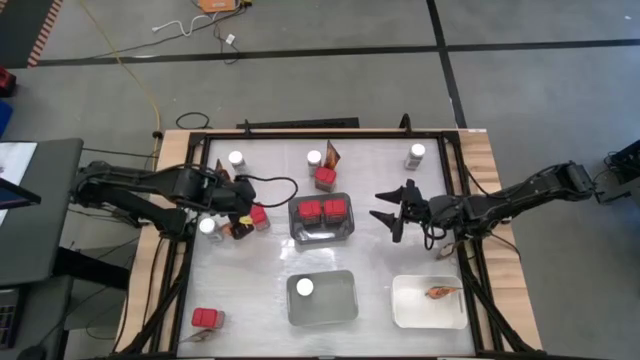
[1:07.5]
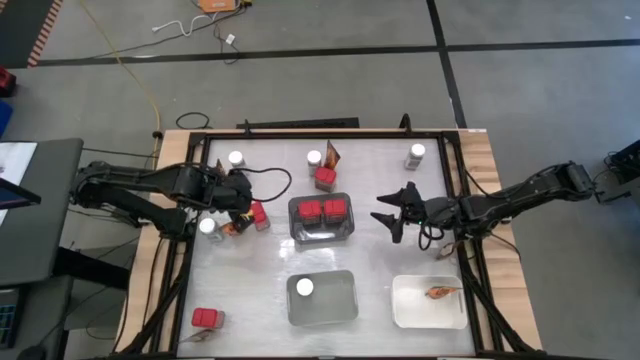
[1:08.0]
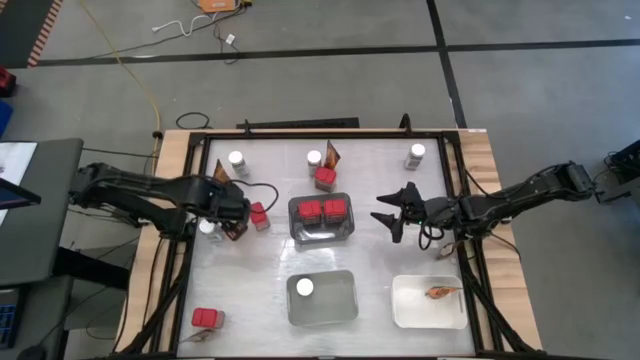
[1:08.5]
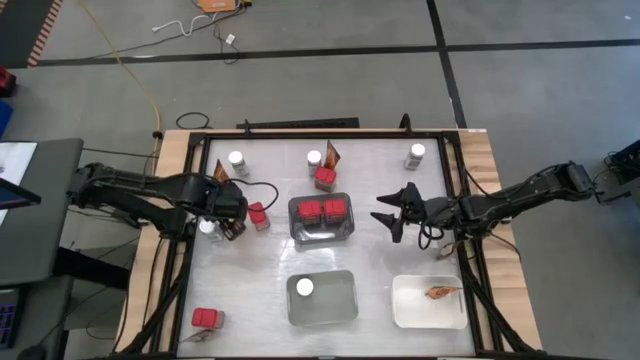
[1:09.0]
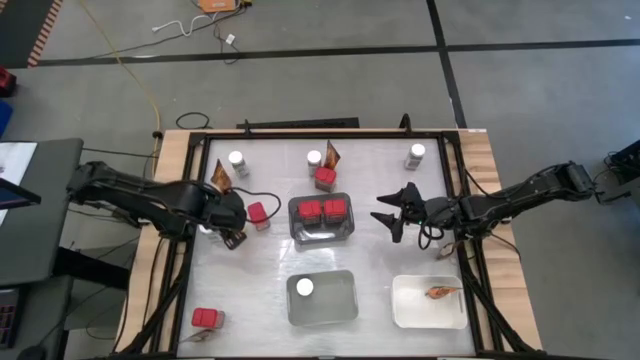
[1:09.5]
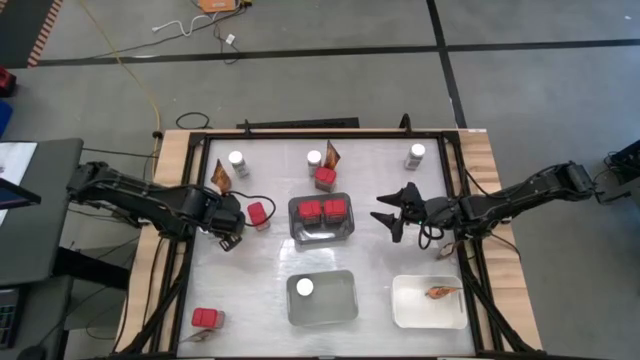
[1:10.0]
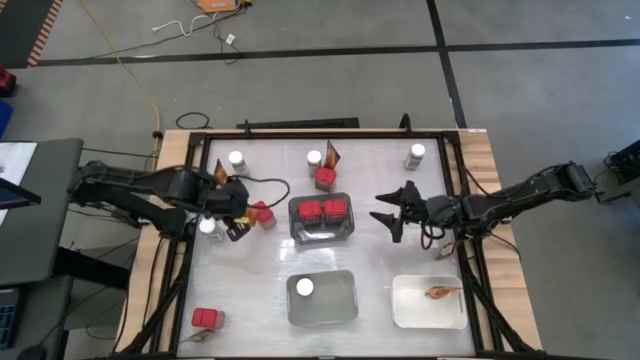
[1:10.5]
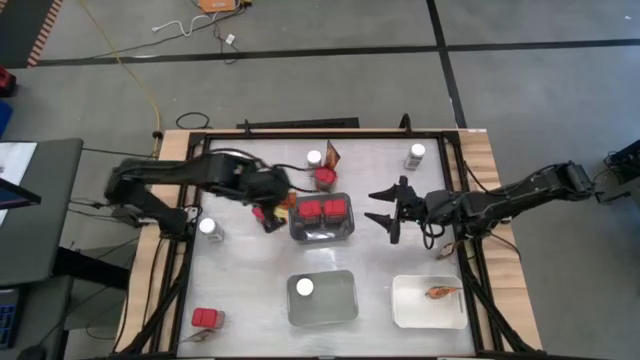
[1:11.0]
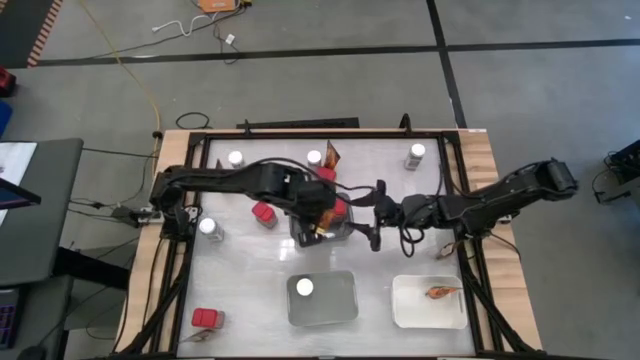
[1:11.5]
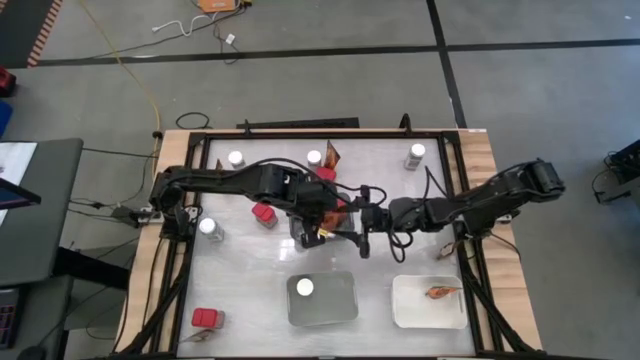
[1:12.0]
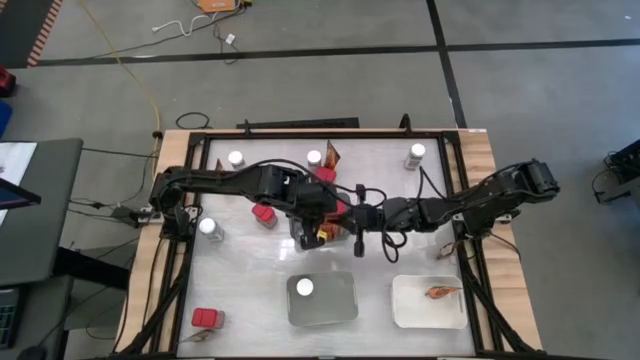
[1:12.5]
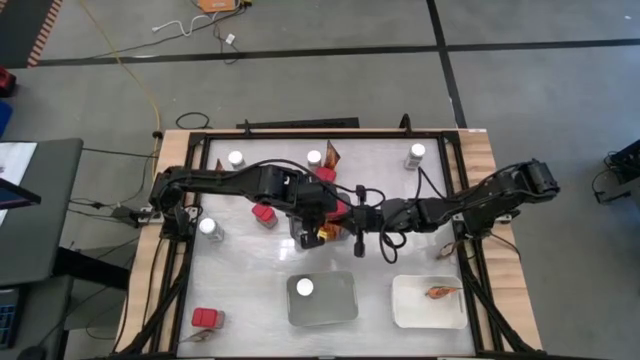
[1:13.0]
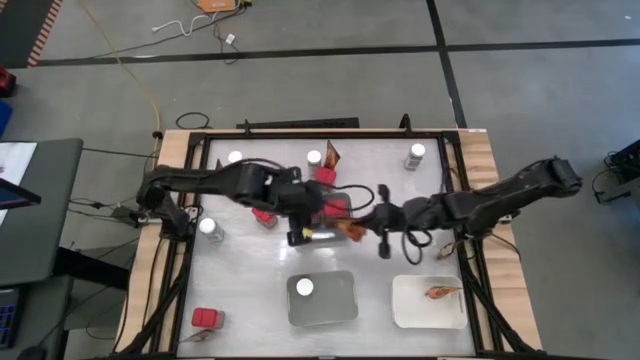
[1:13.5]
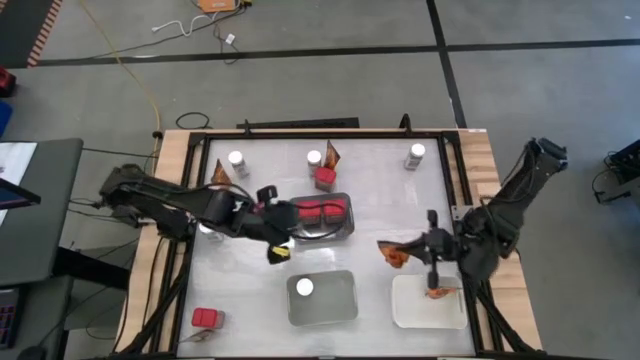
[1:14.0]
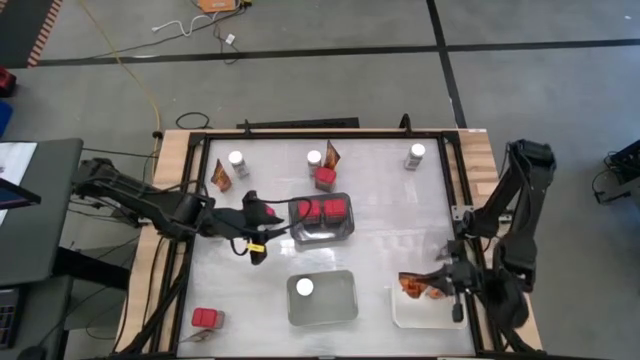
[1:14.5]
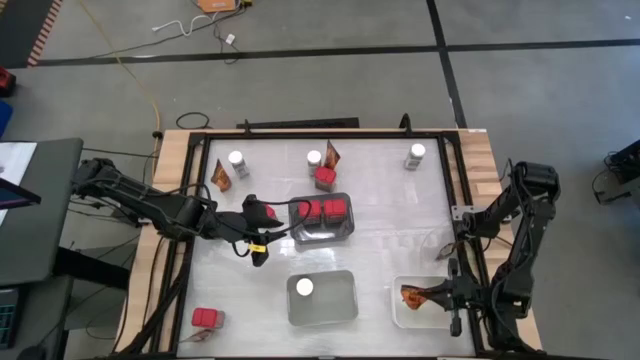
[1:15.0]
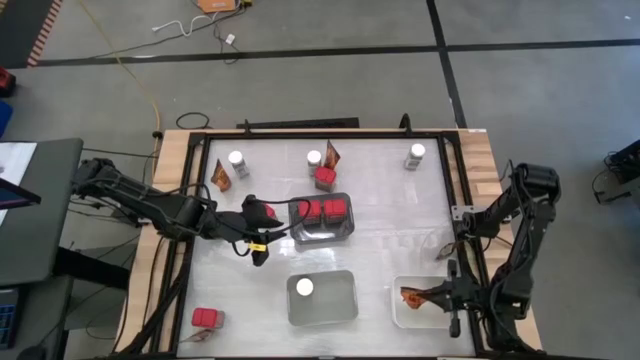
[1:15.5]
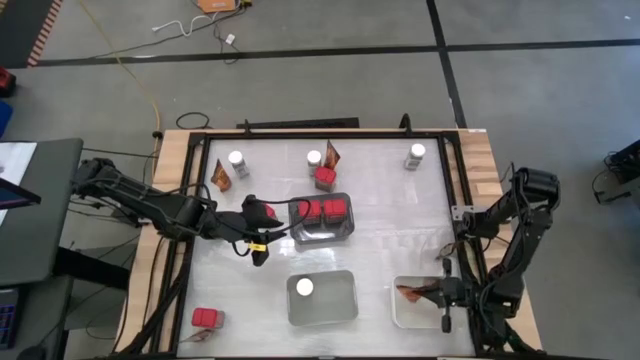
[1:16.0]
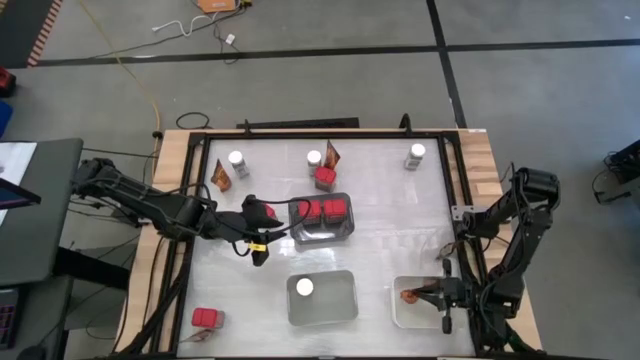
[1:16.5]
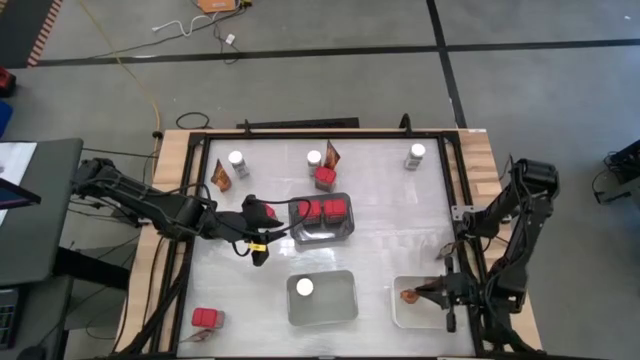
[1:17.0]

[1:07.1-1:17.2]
Task: Sort spices by type
Put the orange seasoning pack into the white bin

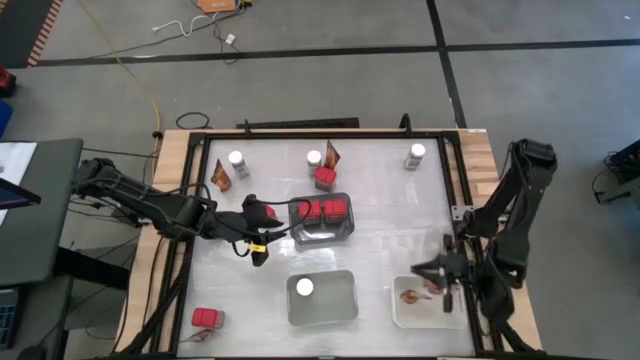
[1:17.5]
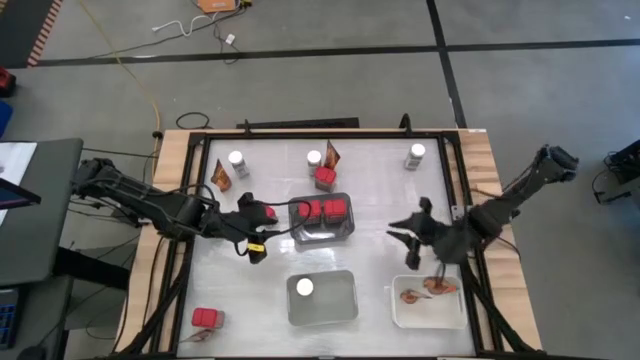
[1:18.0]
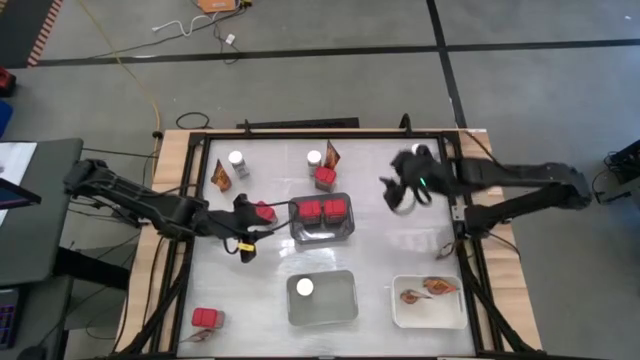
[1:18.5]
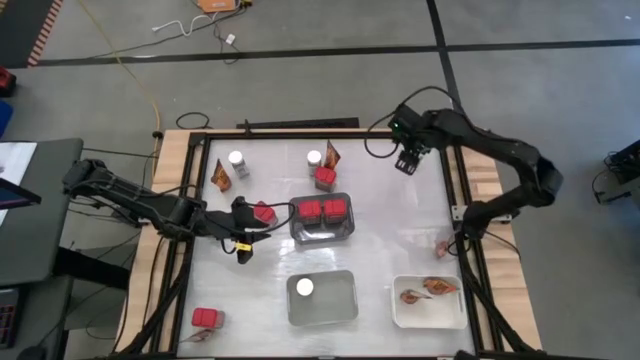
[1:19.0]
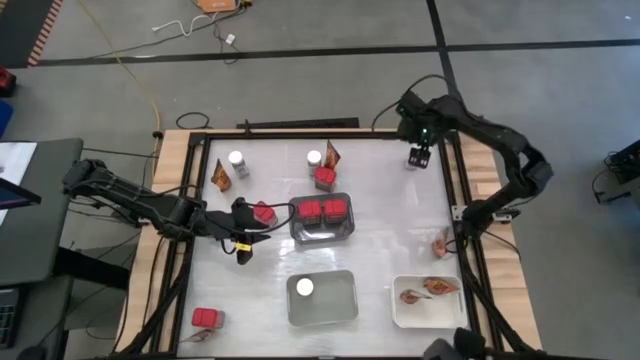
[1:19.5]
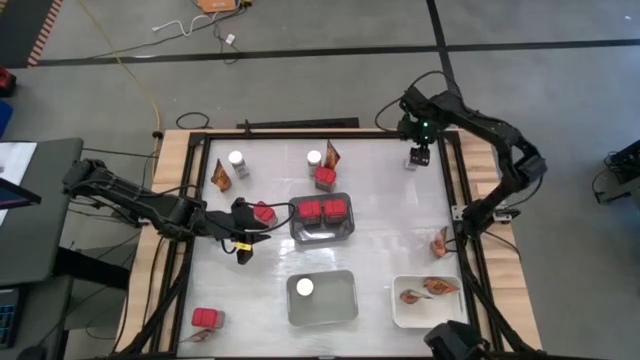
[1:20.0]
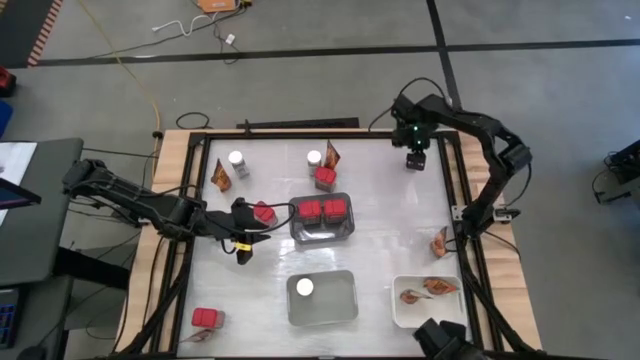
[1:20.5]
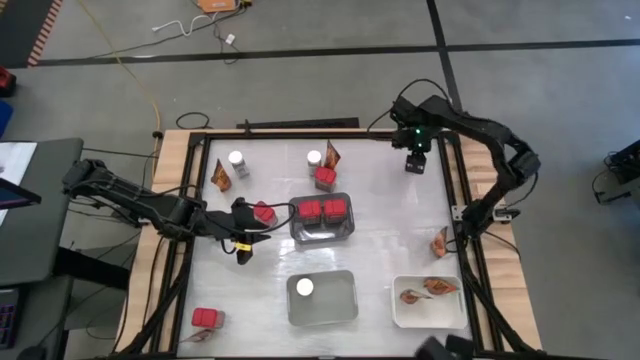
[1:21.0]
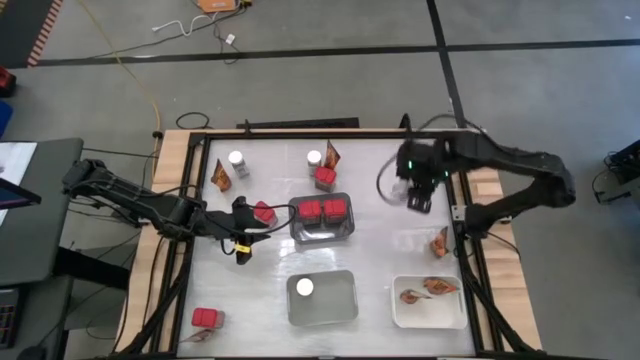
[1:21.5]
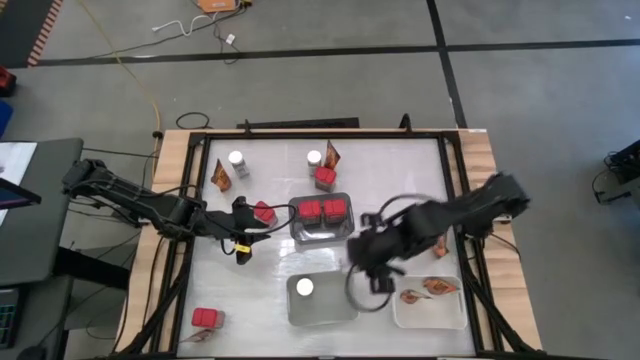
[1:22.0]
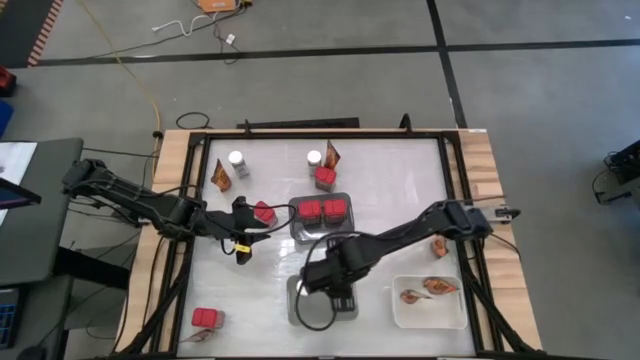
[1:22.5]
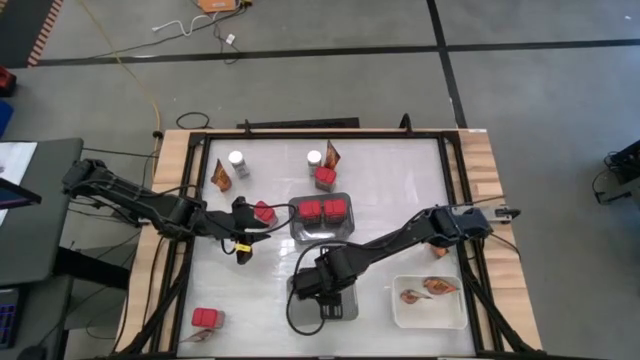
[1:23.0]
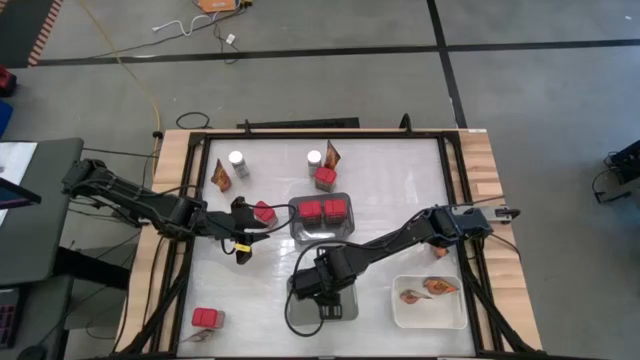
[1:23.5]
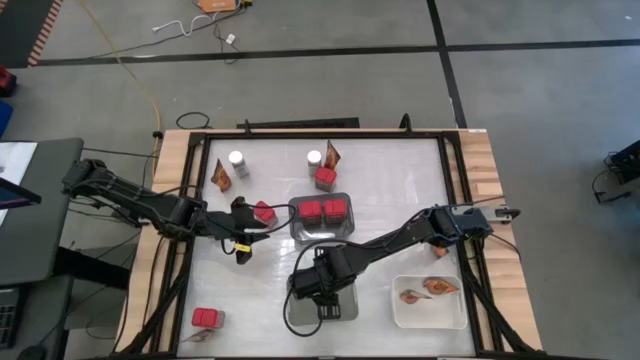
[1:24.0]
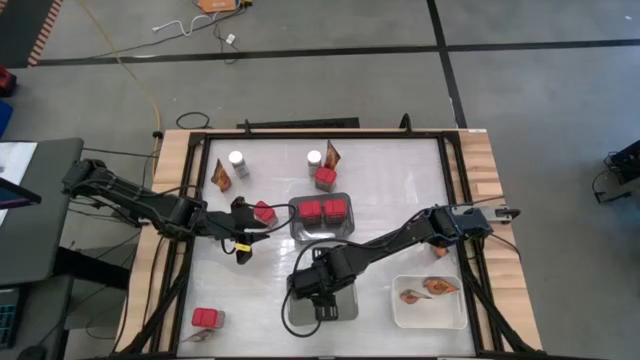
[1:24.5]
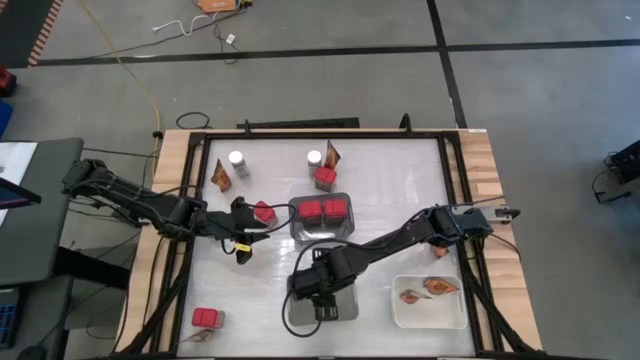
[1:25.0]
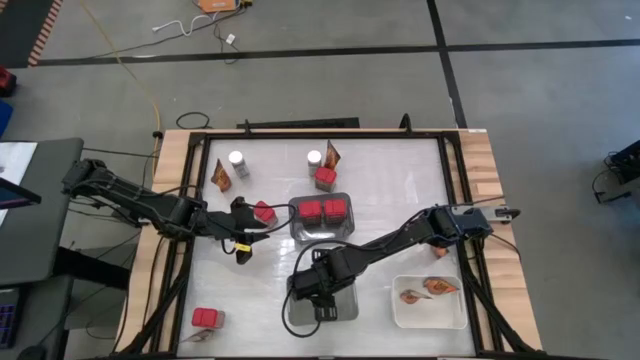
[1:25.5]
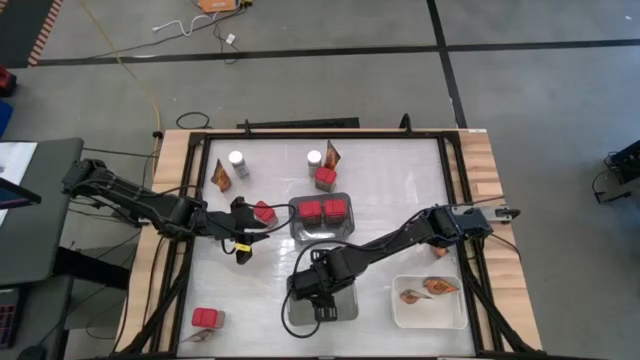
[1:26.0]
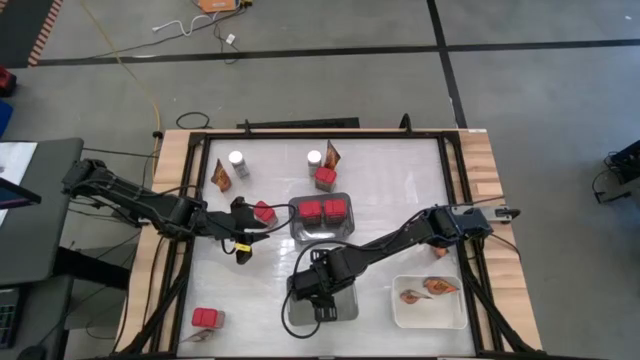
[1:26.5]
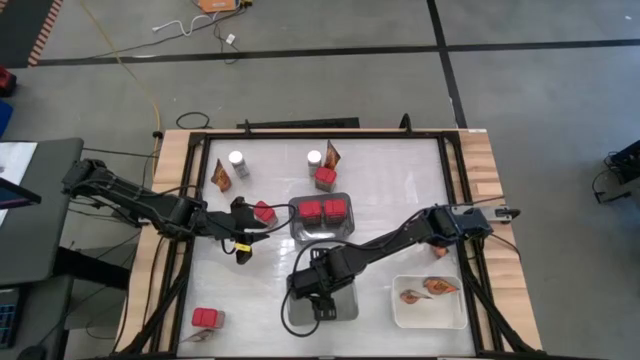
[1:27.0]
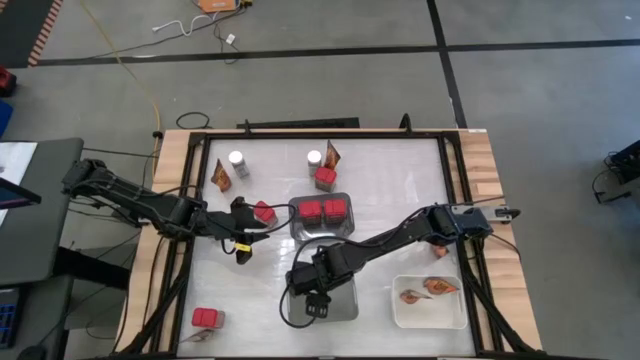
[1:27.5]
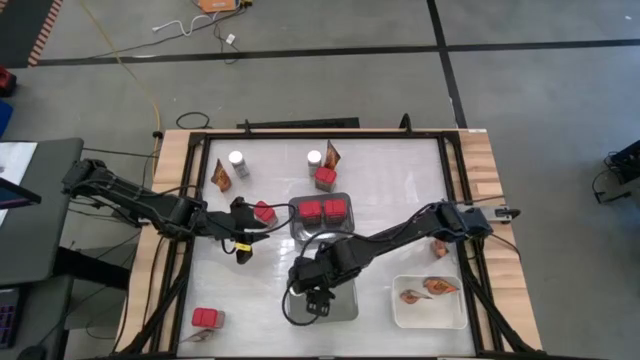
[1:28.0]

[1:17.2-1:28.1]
Put the white seasoning bottle into the gray bin
